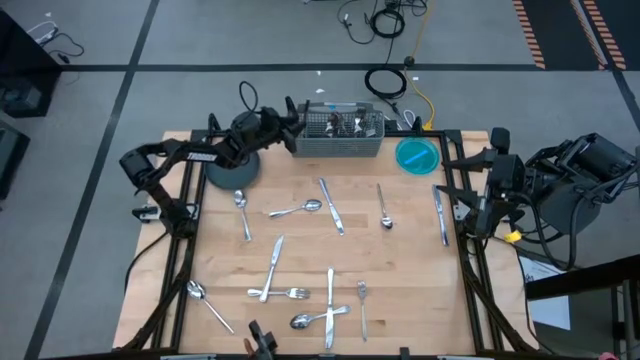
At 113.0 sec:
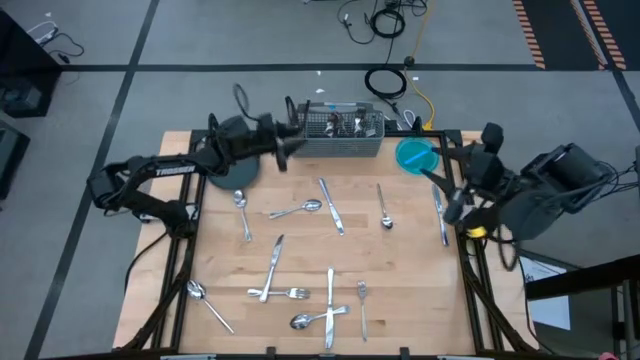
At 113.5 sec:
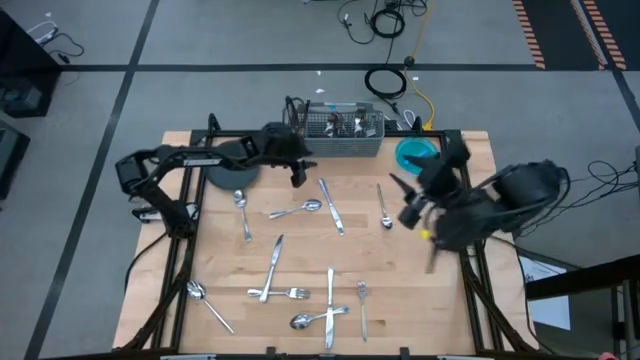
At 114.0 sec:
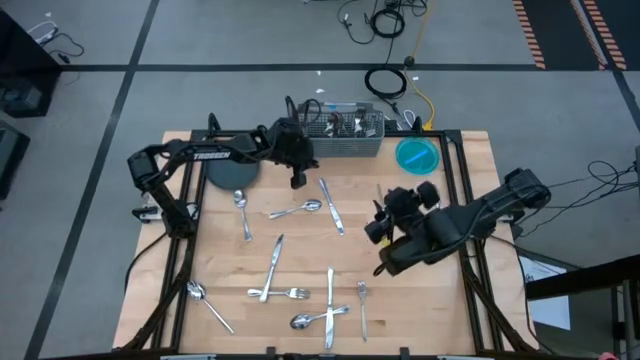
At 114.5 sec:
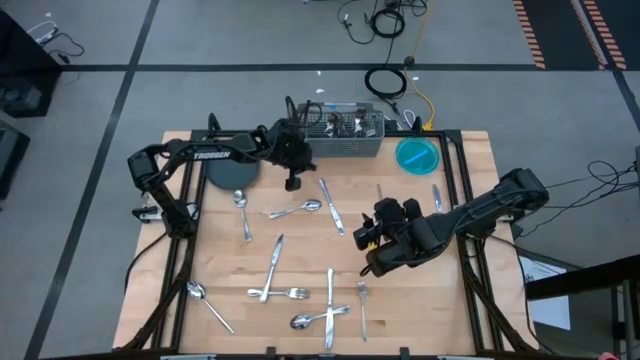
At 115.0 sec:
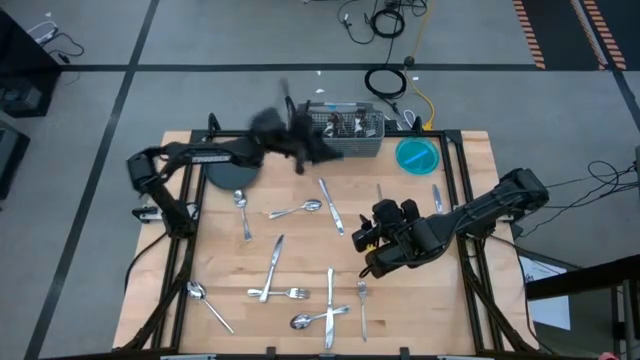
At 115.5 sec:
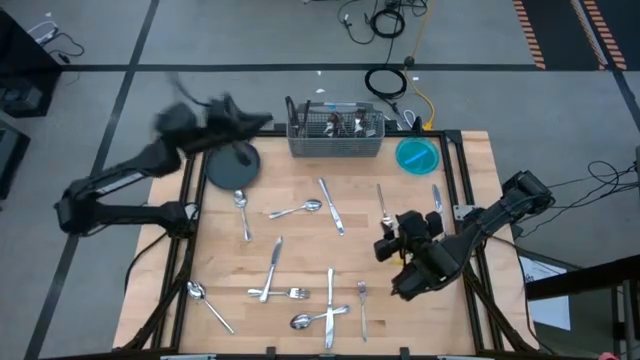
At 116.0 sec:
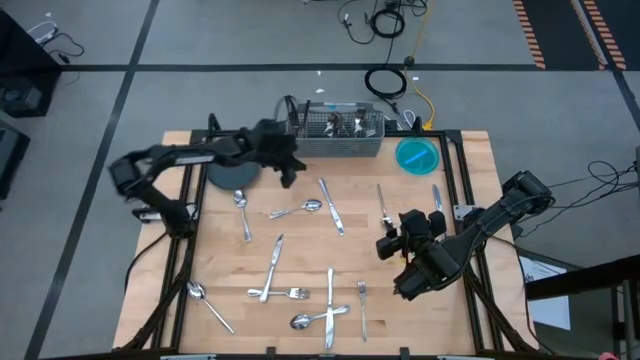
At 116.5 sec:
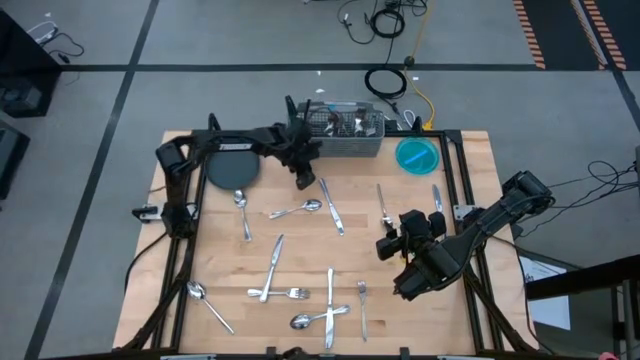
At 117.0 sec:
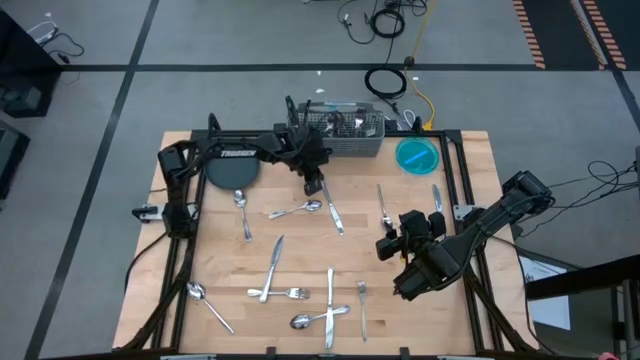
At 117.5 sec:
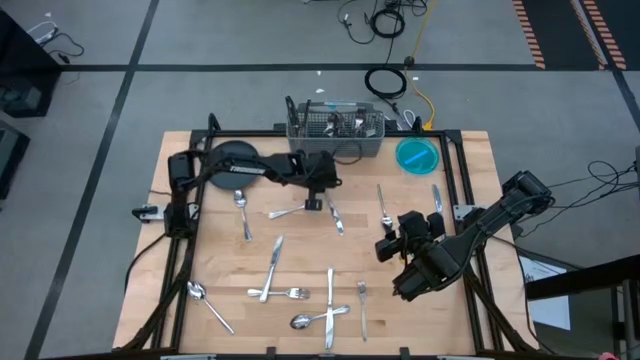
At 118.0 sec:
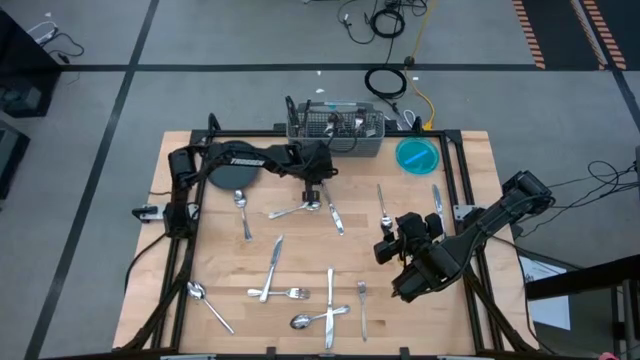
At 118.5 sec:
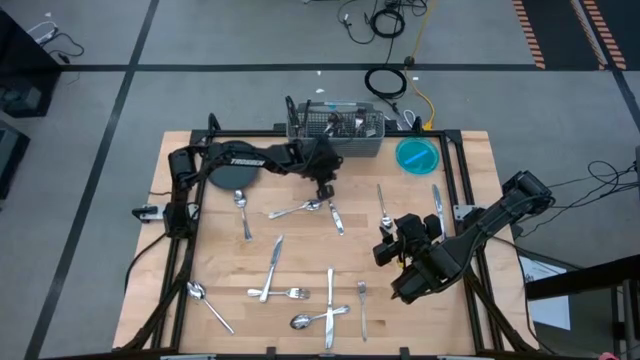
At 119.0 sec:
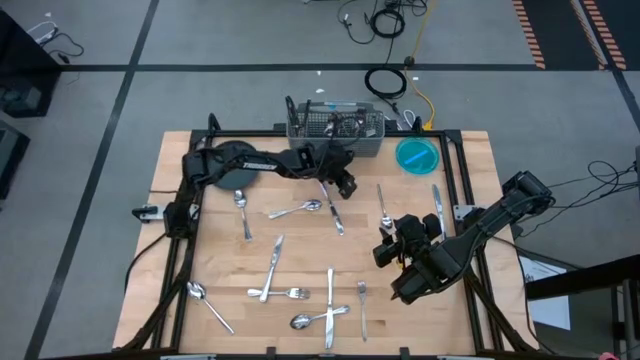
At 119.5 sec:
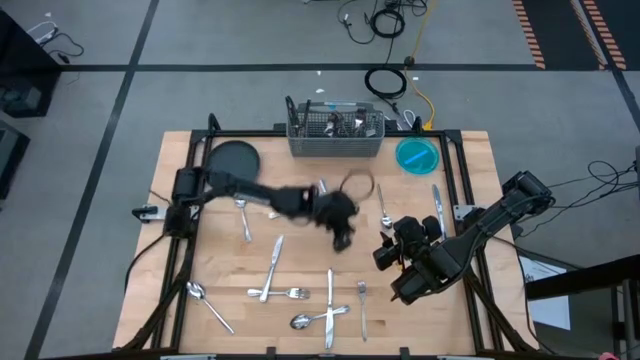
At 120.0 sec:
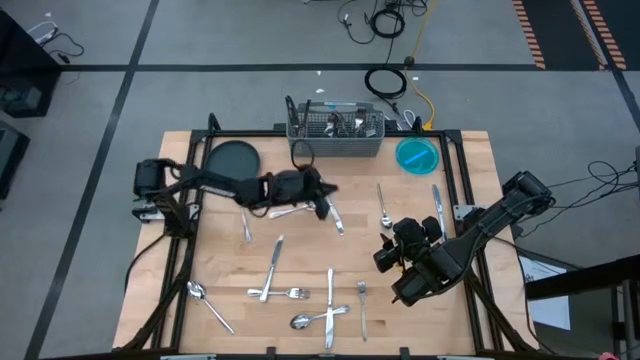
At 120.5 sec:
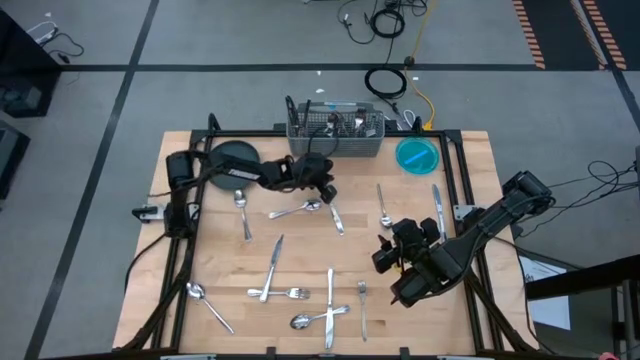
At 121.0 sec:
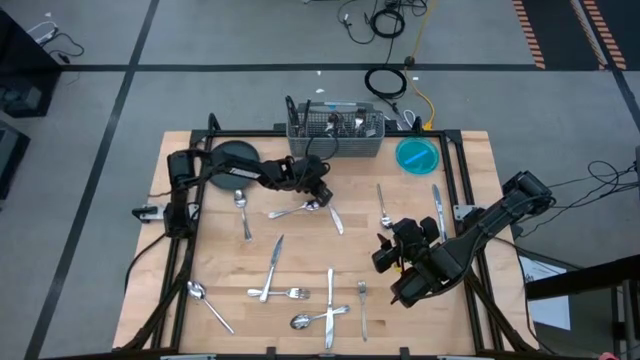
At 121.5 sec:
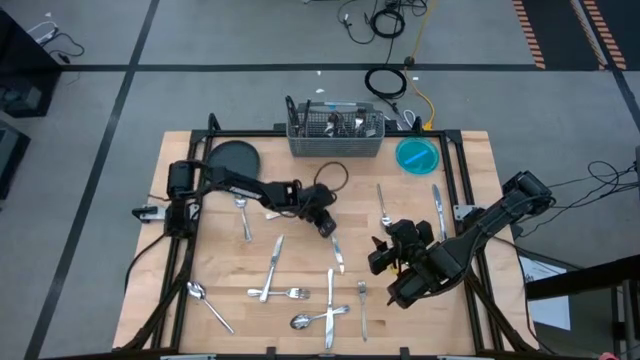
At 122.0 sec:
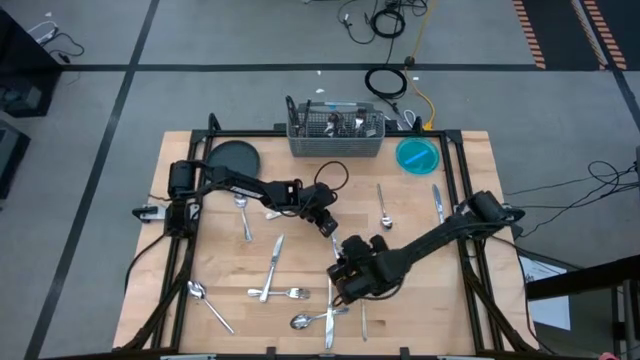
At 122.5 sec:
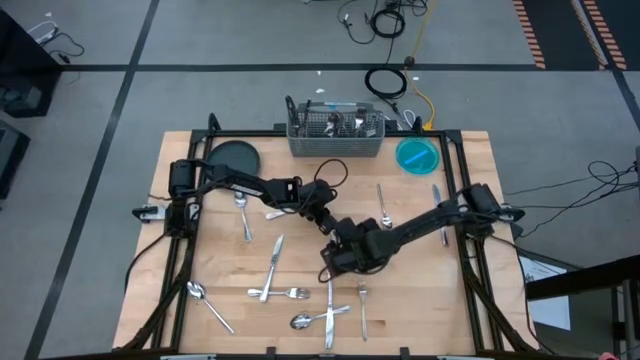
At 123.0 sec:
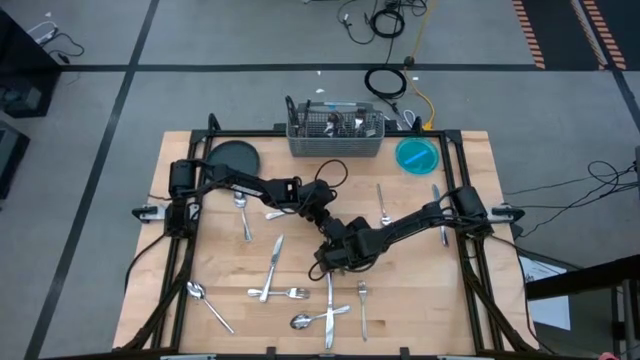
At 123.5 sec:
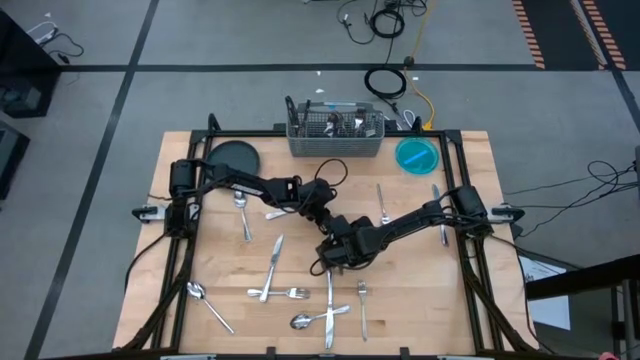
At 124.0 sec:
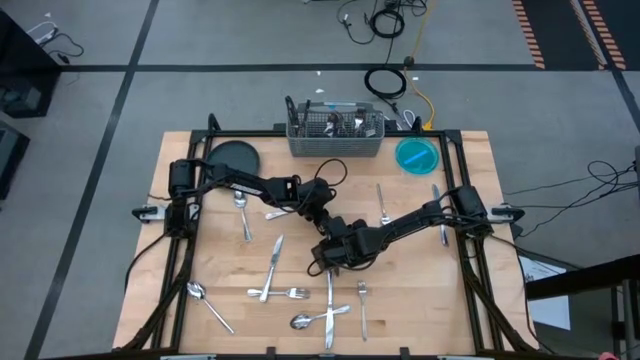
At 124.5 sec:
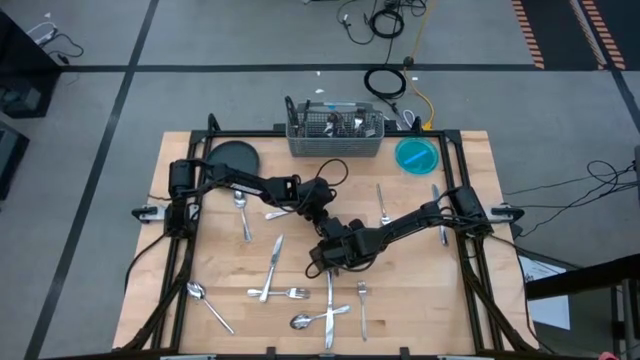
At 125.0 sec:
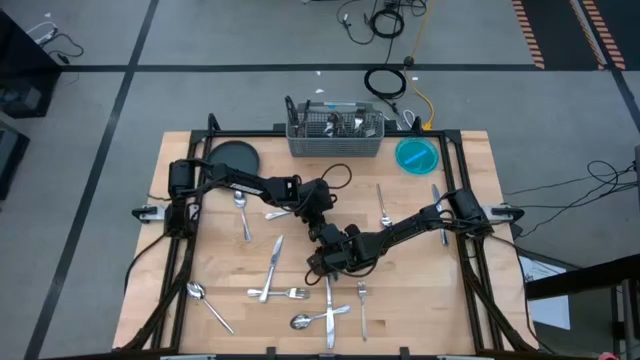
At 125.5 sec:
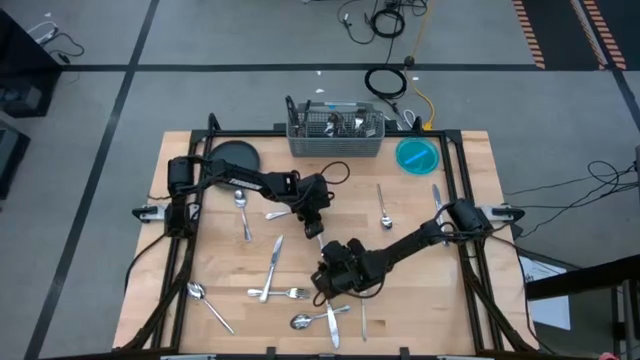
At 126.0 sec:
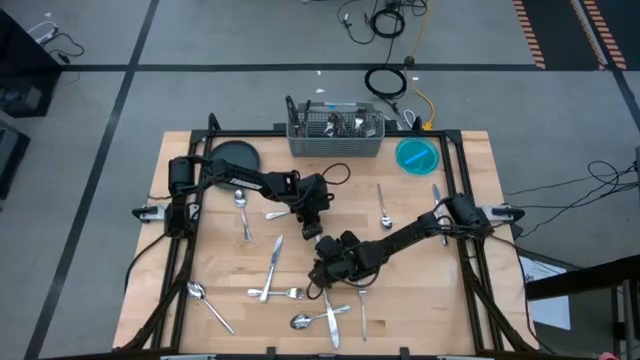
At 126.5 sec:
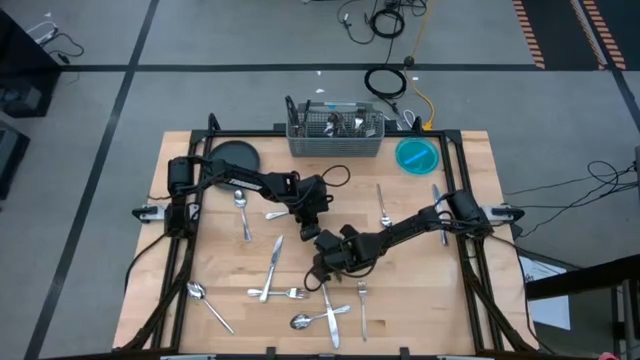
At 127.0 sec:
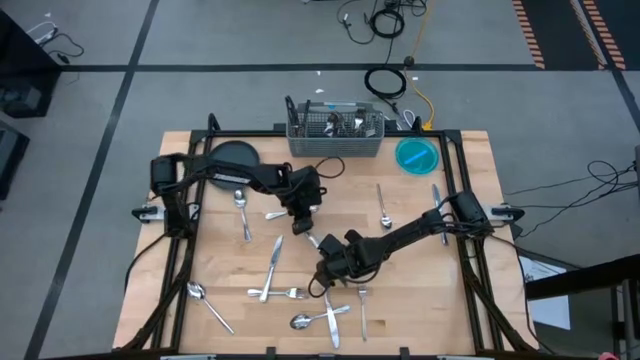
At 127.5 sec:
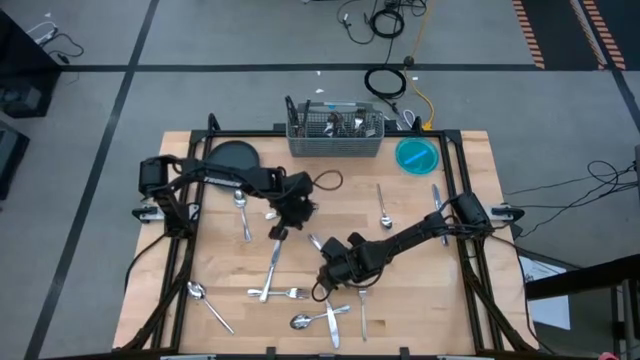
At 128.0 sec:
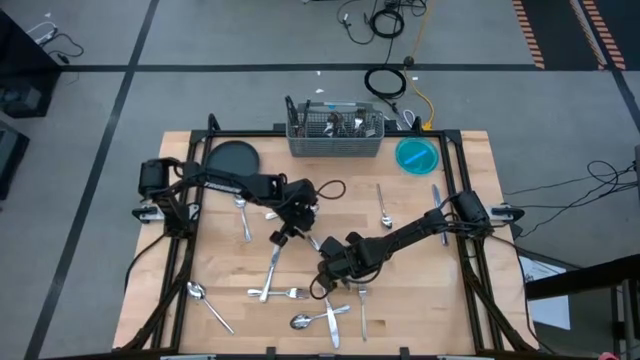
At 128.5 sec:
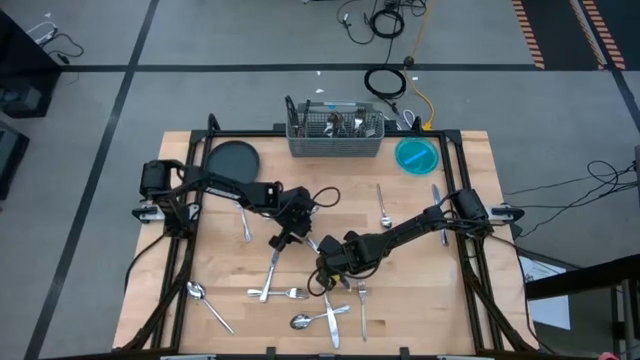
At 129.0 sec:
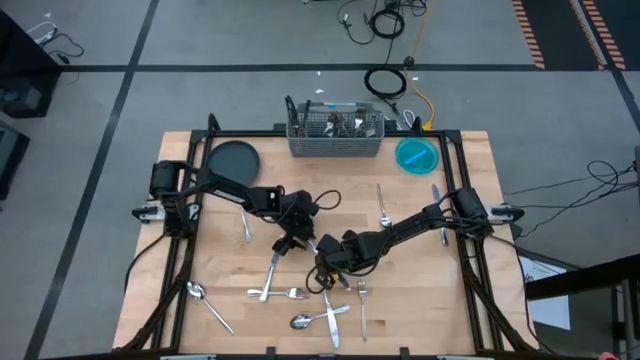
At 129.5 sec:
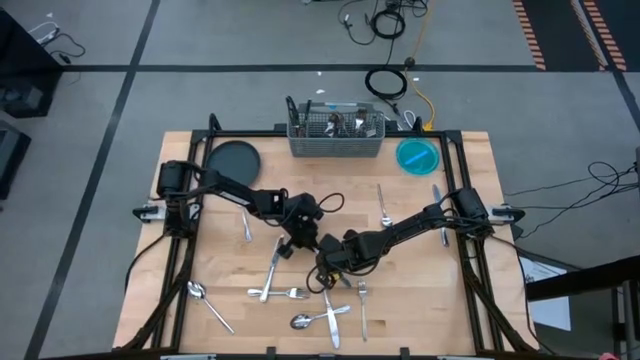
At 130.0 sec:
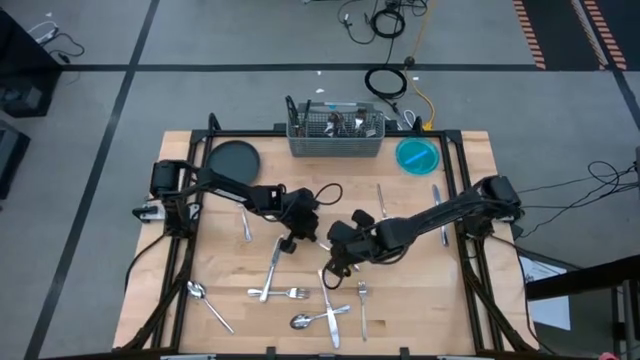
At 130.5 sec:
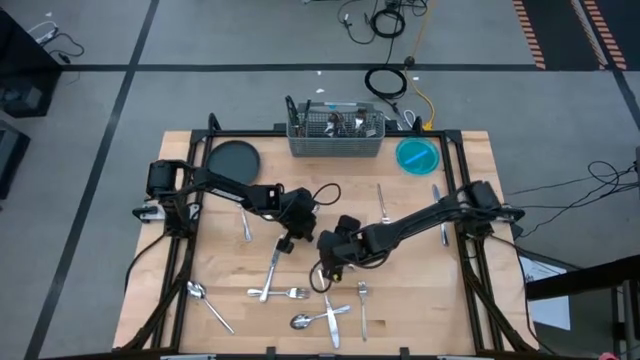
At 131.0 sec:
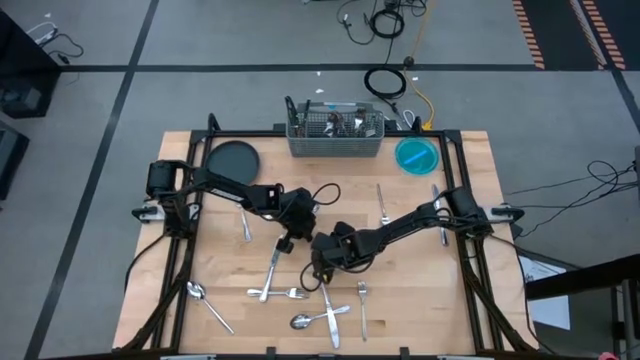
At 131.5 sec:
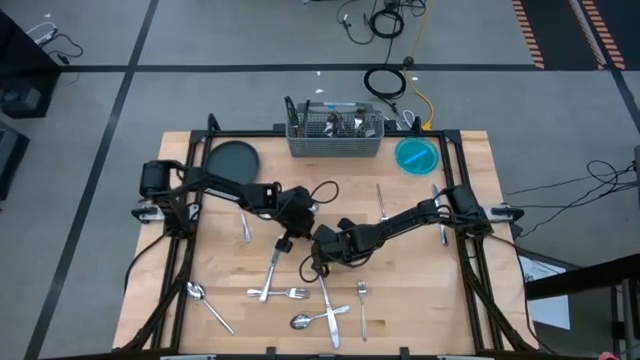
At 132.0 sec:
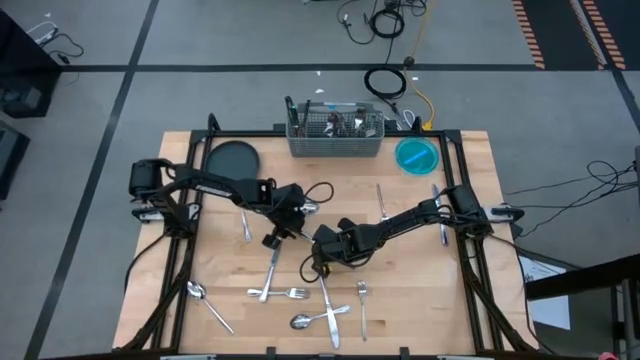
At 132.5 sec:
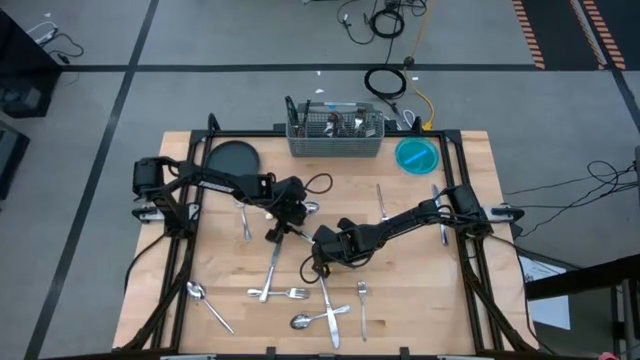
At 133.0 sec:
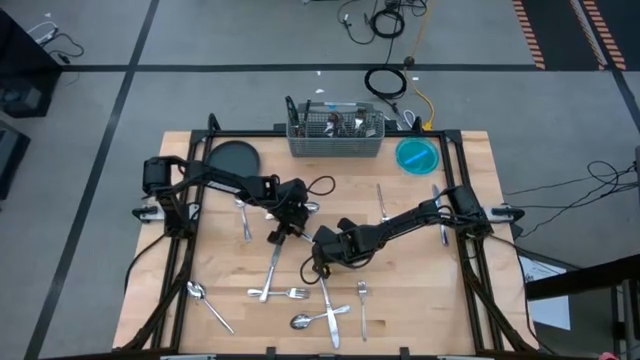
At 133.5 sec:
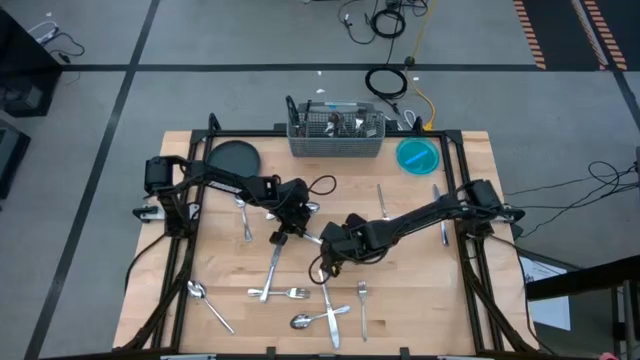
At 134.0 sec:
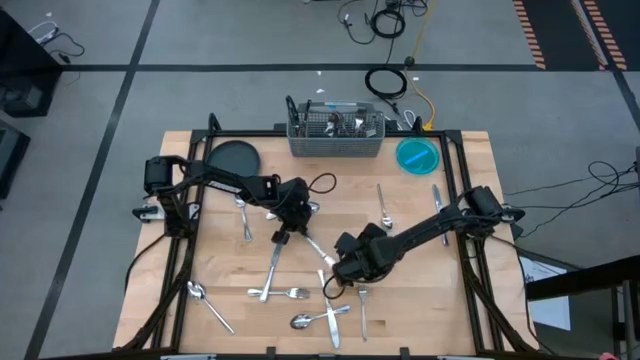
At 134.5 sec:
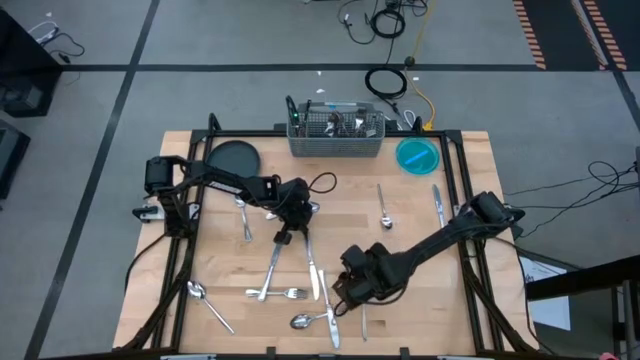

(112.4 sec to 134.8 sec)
Task: Sort silverware
Put the table knife into the silverware organizer
